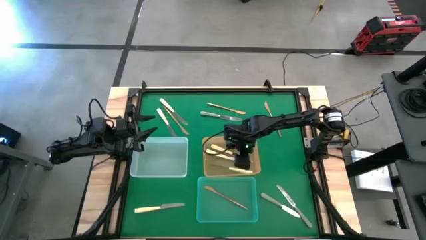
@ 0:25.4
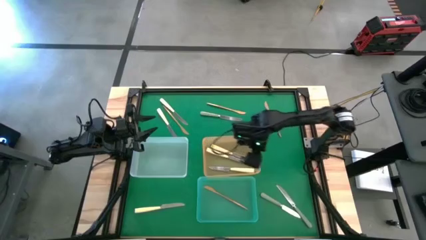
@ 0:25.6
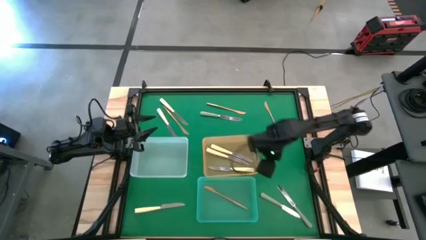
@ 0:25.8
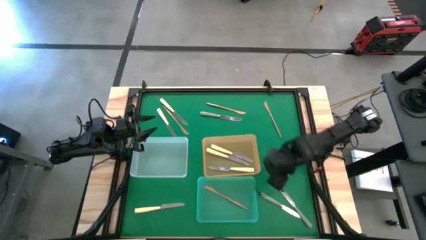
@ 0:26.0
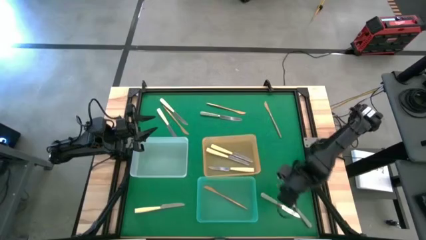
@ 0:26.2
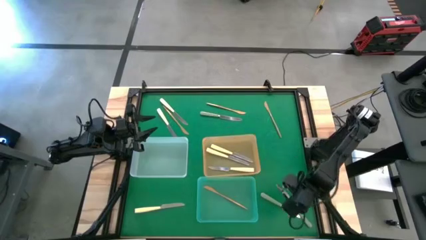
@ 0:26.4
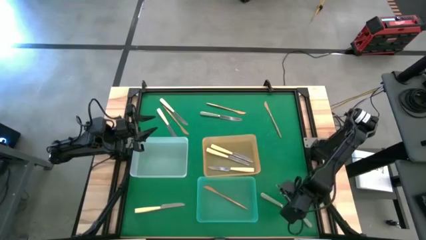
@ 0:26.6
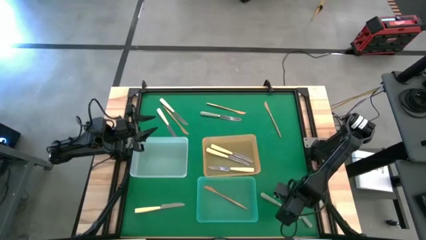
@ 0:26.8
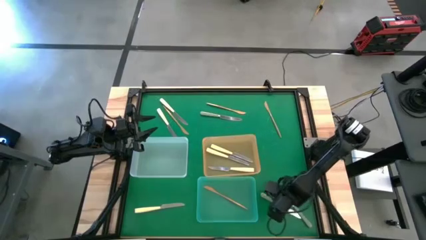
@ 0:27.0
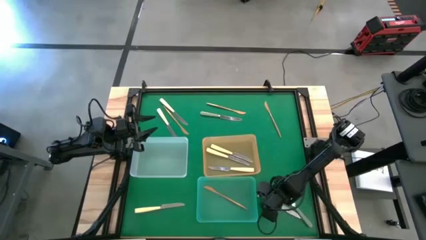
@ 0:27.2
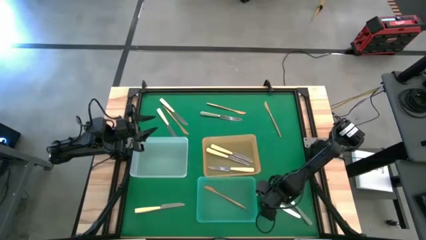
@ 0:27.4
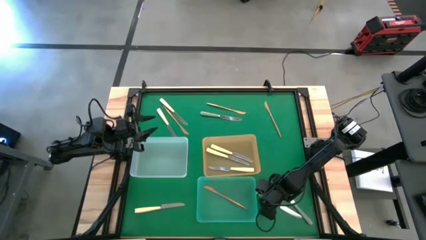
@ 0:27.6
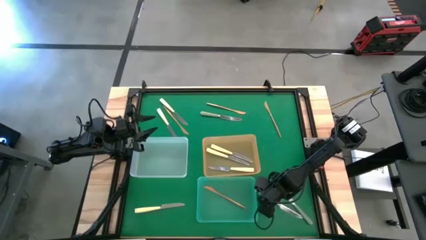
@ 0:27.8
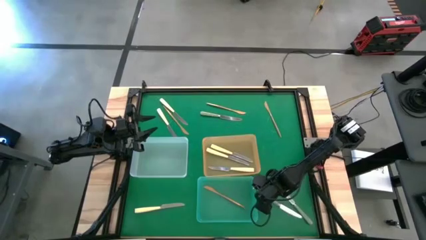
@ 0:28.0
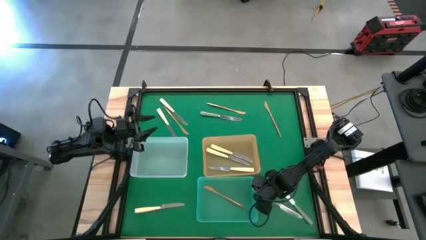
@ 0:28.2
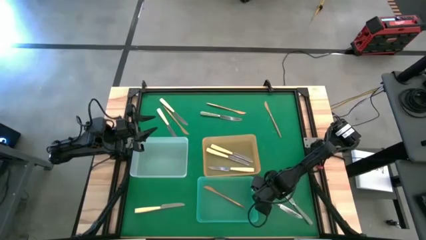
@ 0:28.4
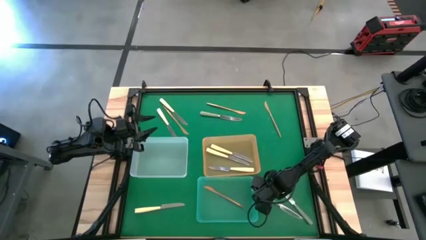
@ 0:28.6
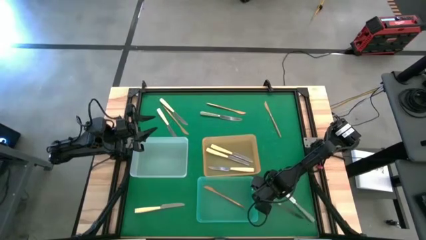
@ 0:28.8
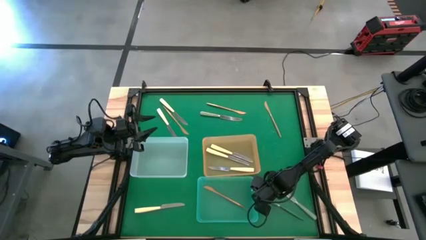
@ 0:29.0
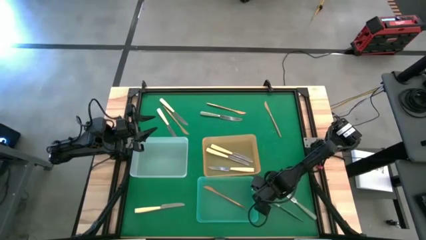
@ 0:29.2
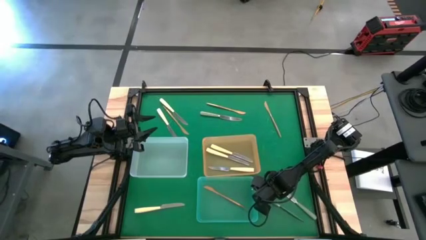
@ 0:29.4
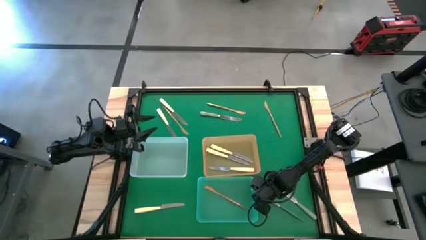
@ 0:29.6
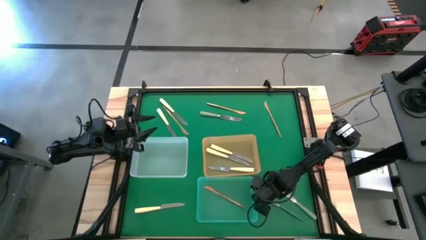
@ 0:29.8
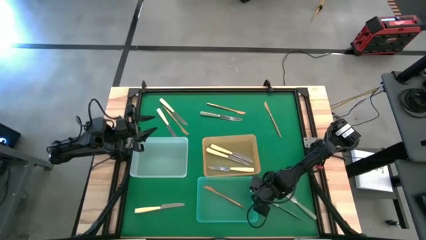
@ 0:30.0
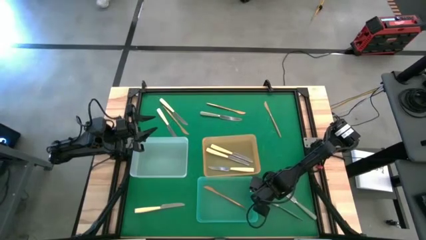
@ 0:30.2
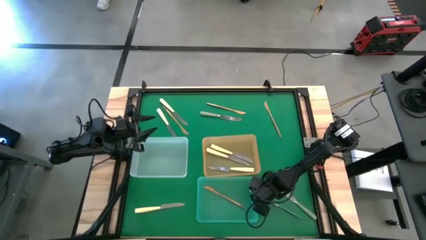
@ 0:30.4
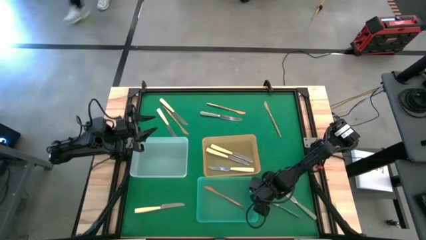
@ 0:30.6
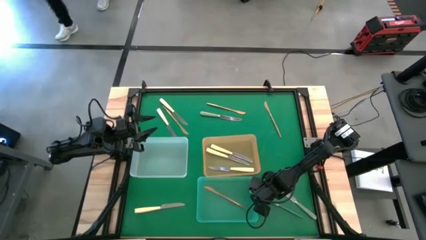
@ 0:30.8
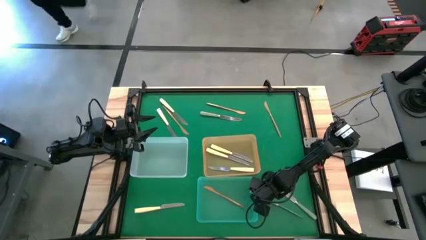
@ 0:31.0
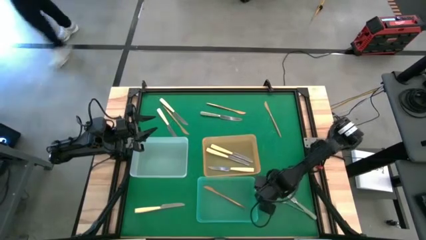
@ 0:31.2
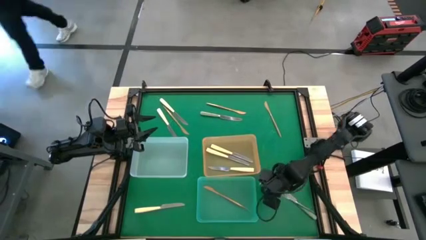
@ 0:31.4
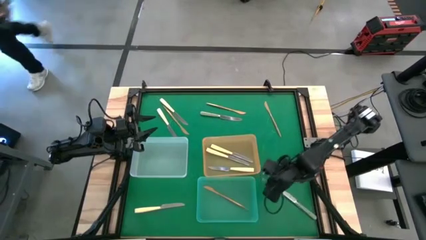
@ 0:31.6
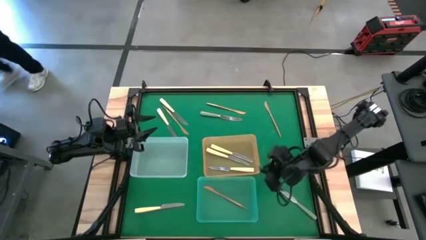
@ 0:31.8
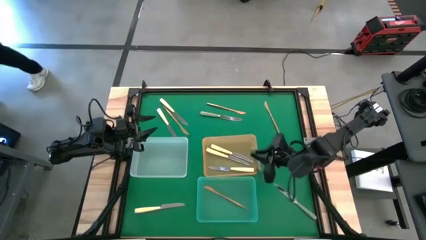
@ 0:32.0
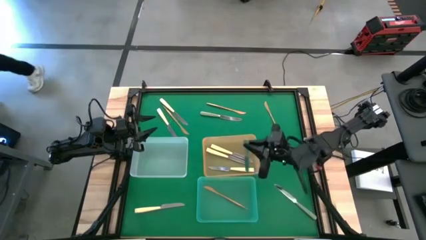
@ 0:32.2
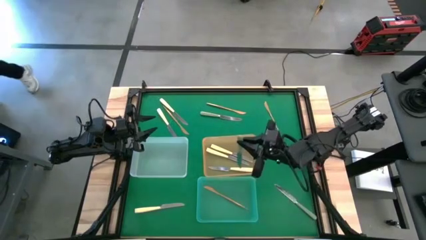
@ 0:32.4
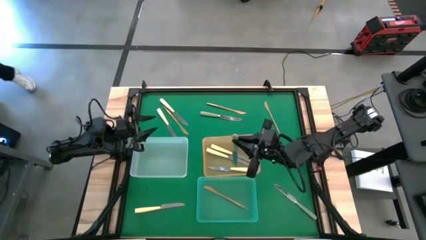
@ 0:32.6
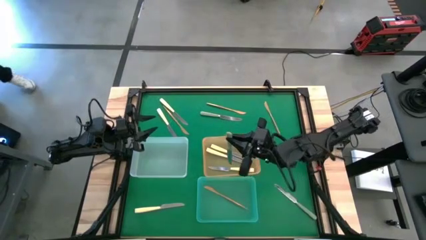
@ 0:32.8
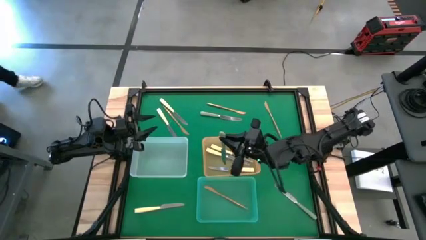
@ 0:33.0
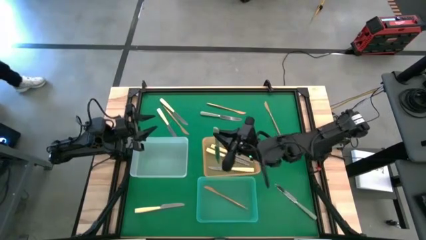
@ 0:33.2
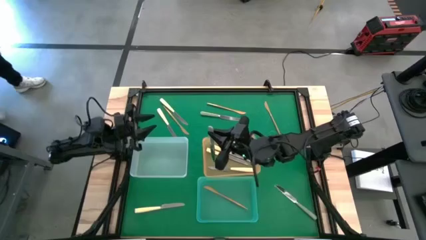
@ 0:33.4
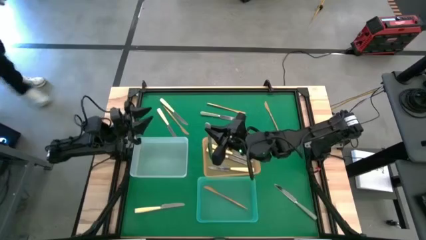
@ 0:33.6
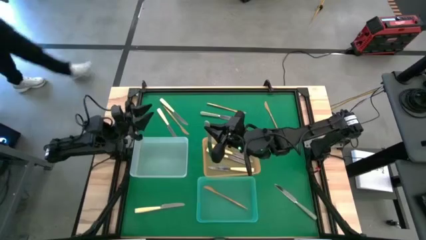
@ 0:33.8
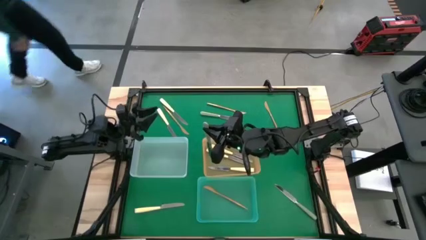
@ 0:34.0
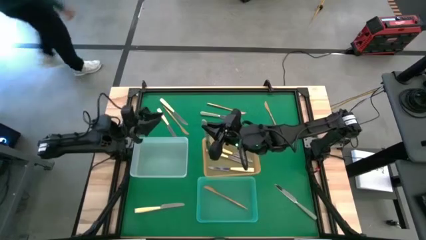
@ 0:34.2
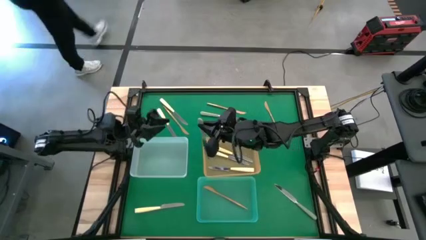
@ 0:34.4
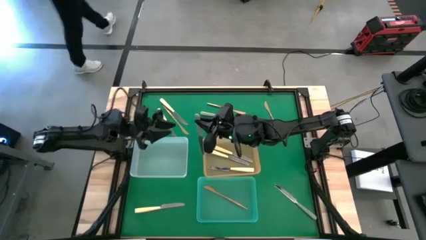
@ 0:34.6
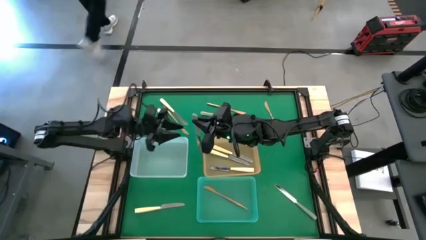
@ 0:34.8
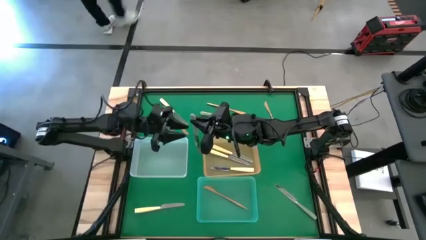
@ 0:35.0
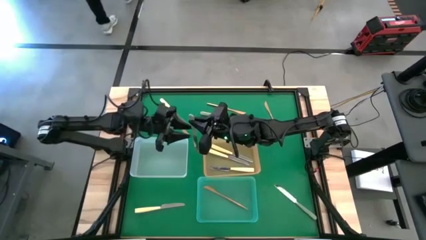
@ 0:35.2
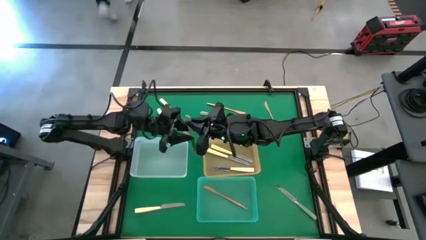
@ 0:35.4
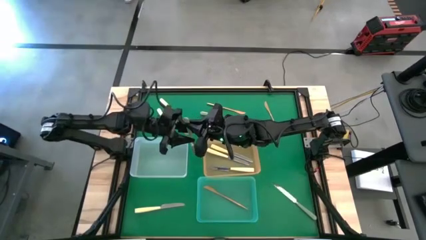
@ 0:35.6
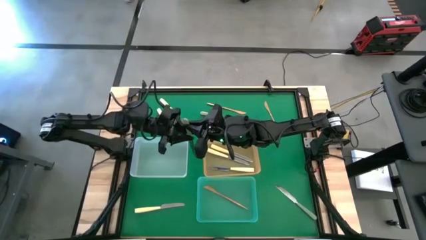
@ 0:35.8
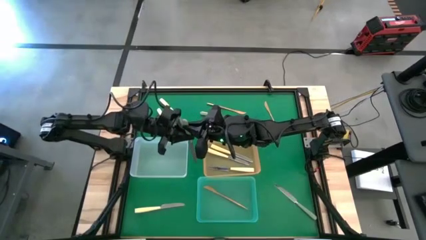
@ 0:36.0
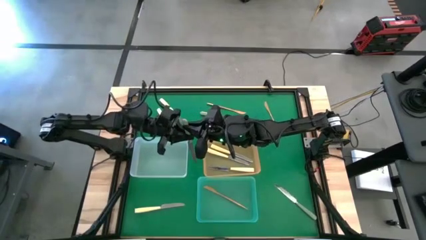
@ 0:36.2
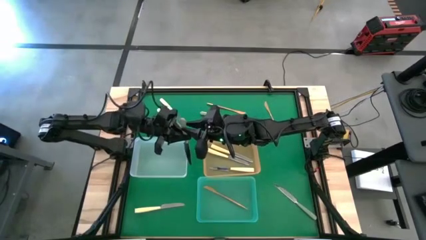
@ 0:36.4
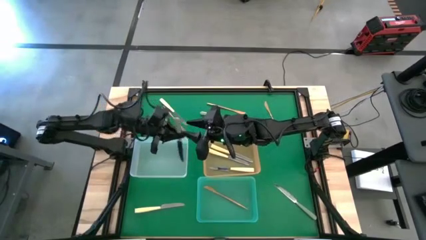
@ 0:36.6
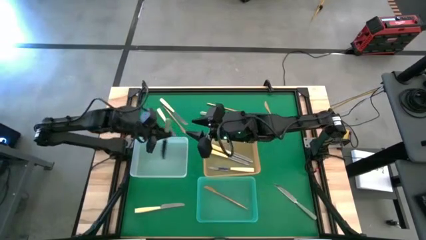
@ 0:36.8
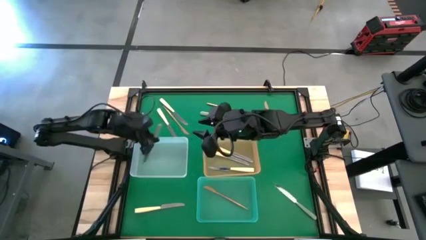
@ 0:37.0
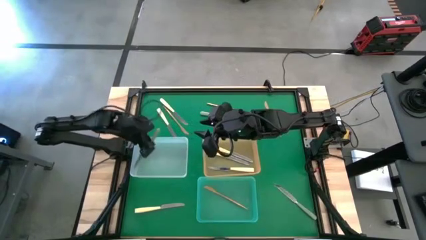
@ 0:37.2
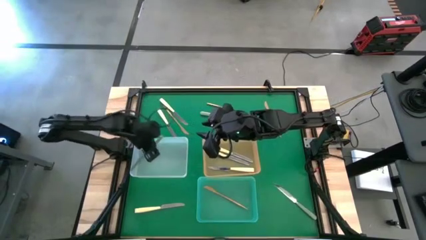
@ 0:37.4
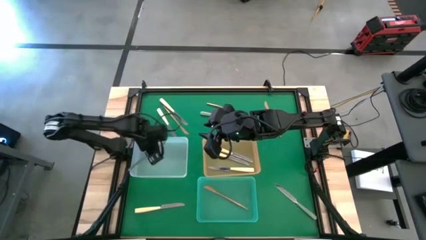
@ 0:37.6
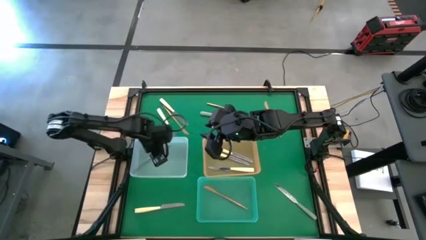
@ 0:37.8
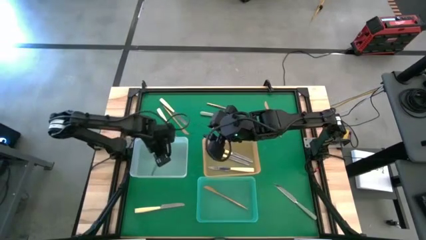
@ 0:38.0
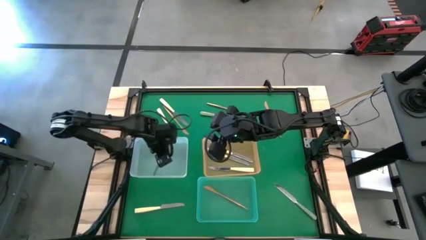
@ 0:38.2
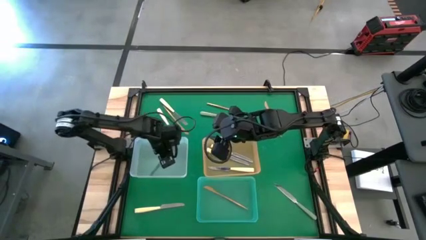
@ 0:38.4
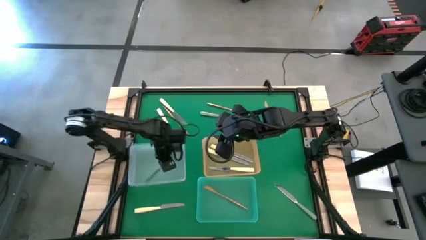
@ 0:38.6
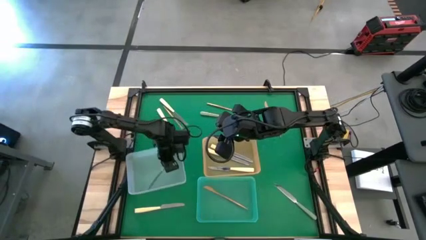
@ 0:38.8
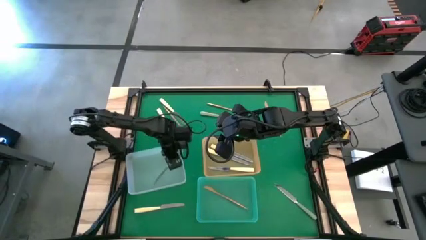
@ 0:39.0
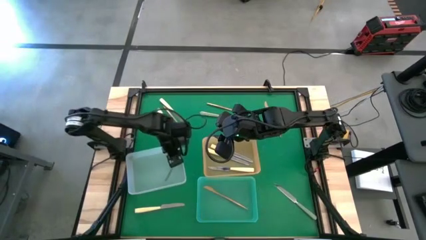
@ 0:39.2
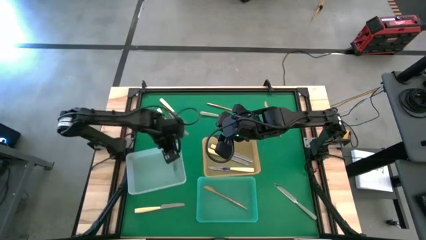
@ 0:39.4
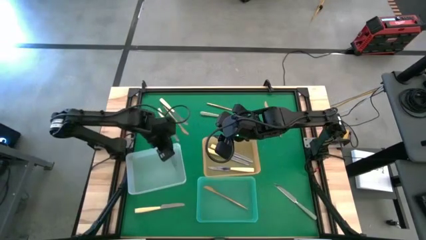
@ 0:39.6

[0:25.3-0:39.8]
Task: Sort silverware by color (type)
Put the green table knife into the white bin
